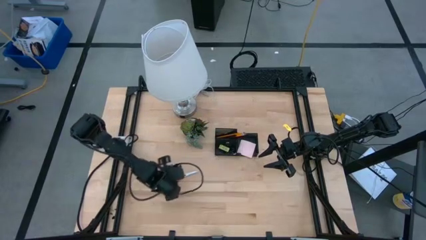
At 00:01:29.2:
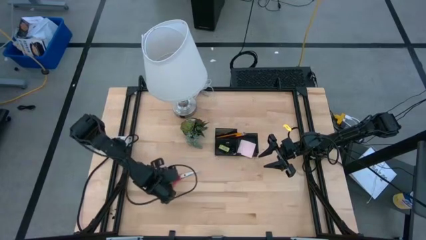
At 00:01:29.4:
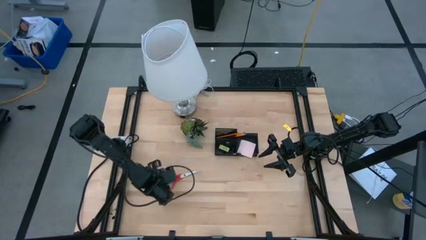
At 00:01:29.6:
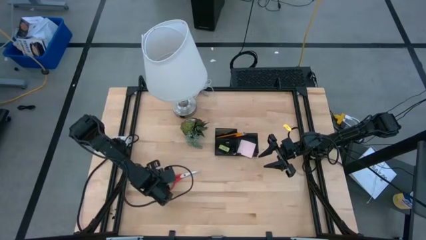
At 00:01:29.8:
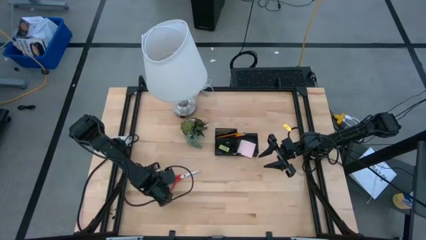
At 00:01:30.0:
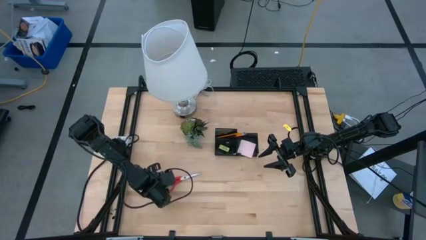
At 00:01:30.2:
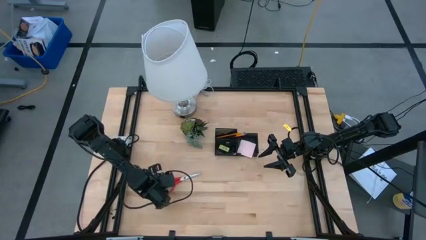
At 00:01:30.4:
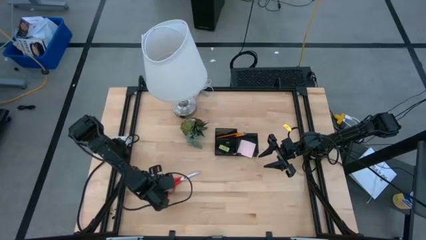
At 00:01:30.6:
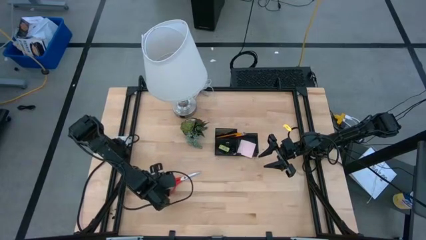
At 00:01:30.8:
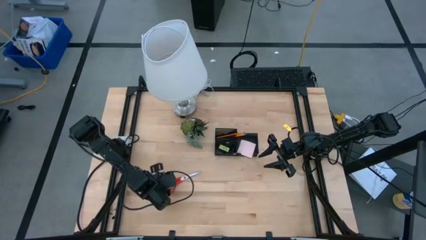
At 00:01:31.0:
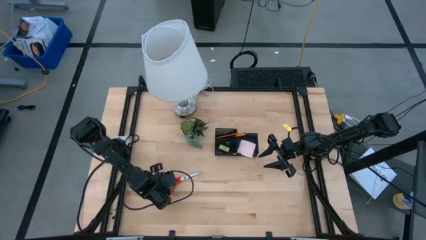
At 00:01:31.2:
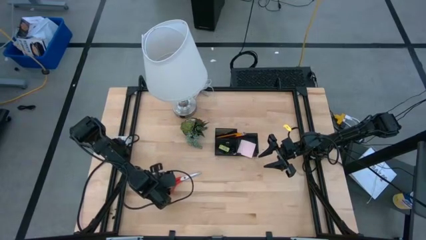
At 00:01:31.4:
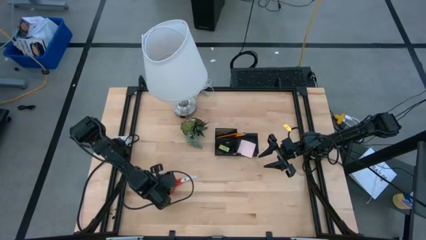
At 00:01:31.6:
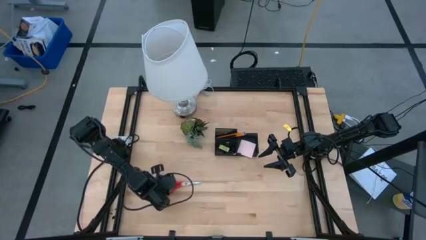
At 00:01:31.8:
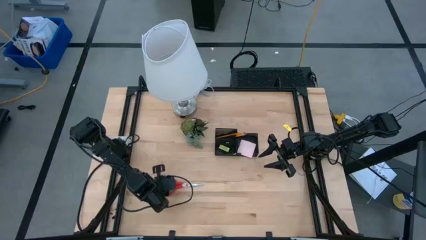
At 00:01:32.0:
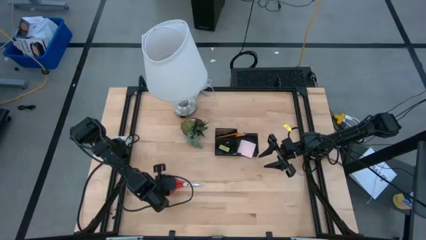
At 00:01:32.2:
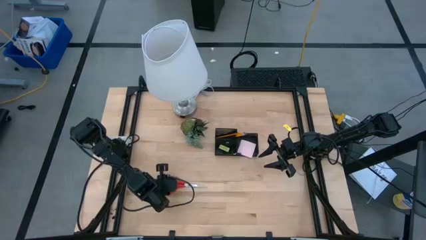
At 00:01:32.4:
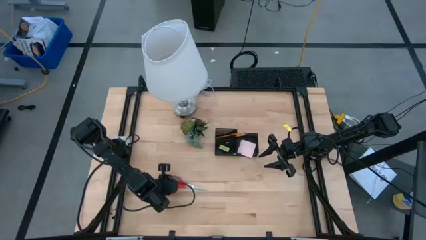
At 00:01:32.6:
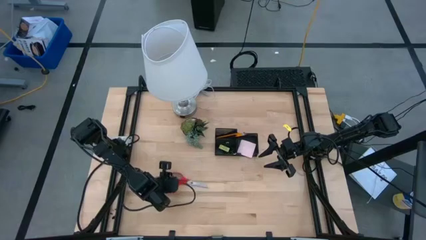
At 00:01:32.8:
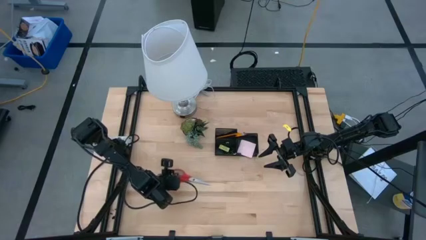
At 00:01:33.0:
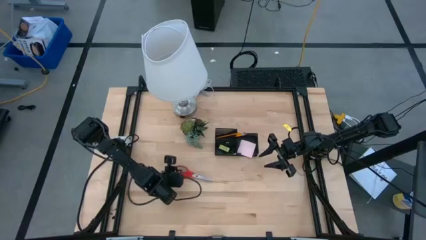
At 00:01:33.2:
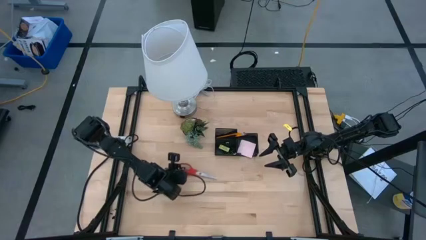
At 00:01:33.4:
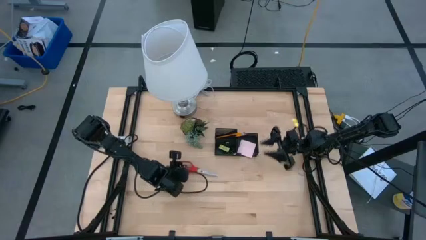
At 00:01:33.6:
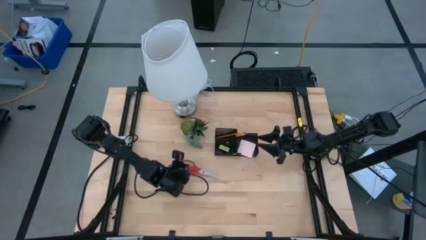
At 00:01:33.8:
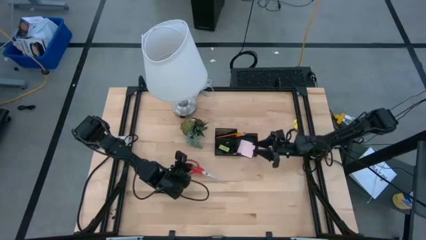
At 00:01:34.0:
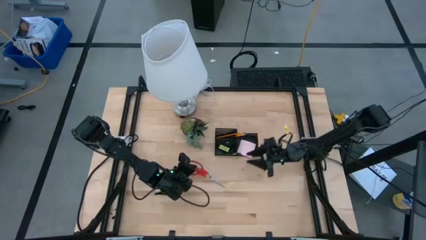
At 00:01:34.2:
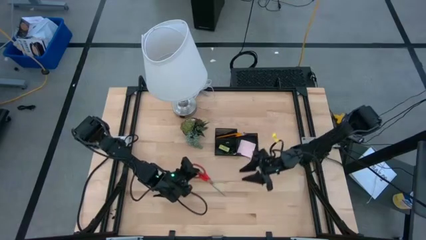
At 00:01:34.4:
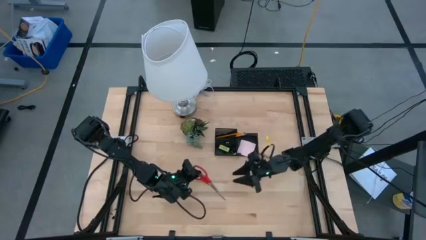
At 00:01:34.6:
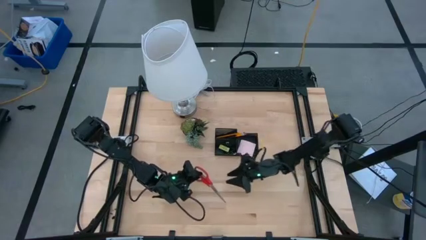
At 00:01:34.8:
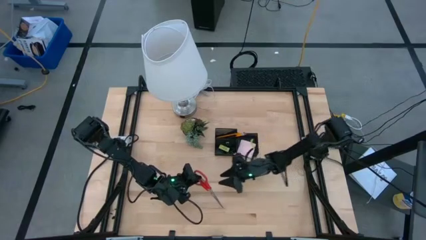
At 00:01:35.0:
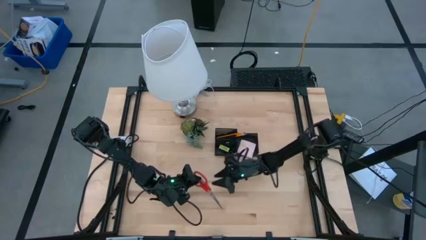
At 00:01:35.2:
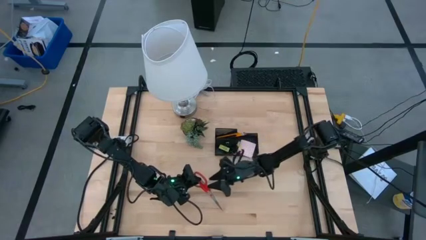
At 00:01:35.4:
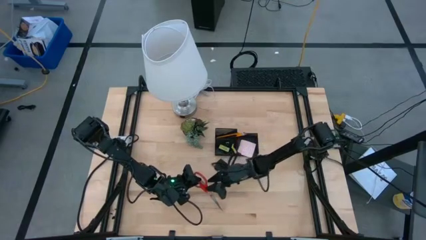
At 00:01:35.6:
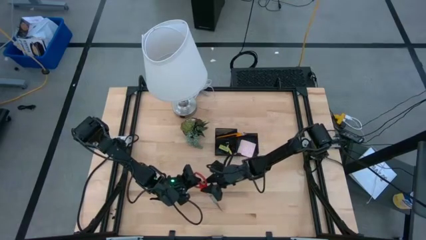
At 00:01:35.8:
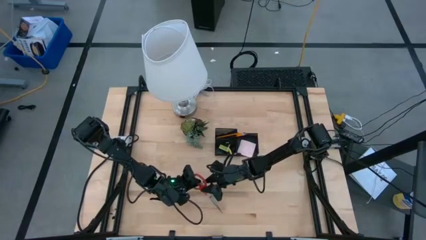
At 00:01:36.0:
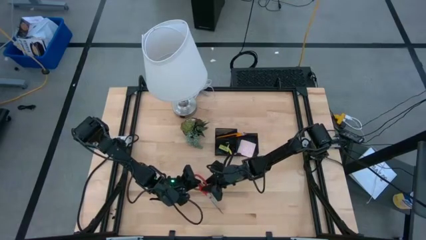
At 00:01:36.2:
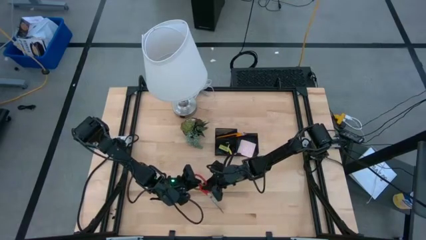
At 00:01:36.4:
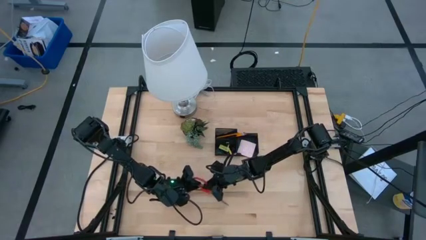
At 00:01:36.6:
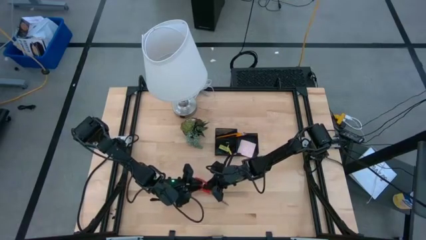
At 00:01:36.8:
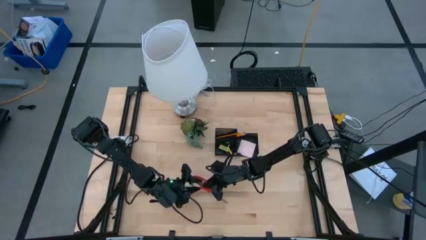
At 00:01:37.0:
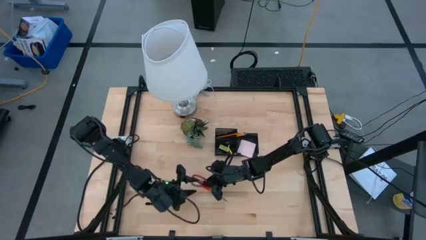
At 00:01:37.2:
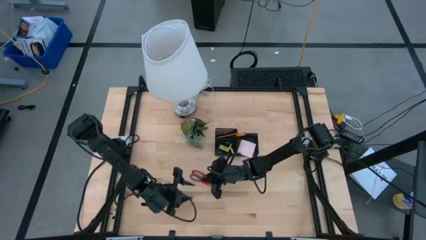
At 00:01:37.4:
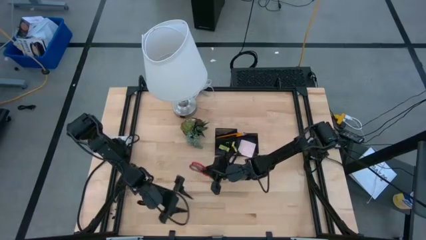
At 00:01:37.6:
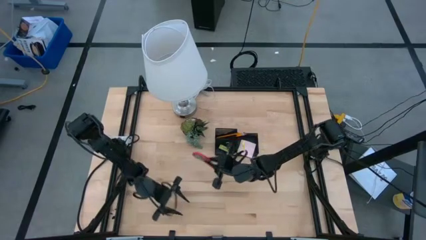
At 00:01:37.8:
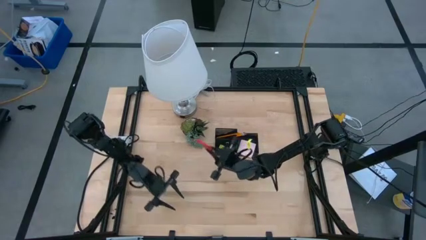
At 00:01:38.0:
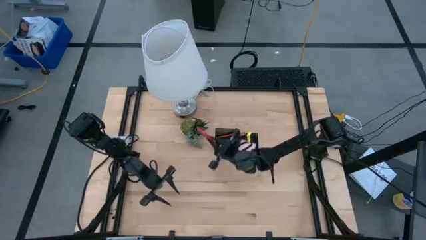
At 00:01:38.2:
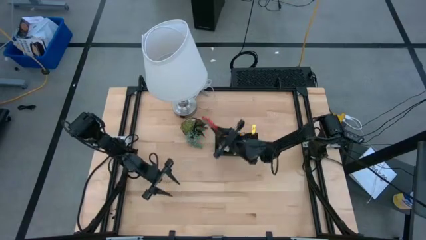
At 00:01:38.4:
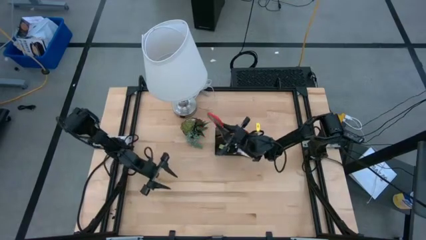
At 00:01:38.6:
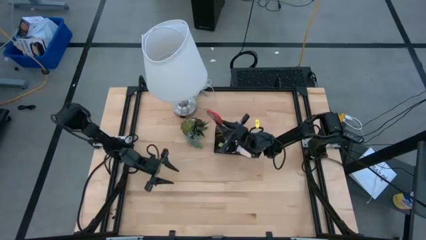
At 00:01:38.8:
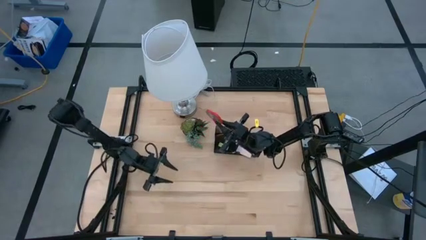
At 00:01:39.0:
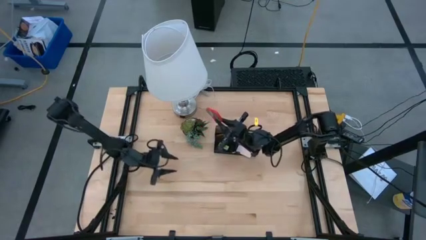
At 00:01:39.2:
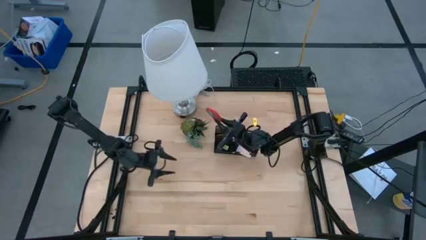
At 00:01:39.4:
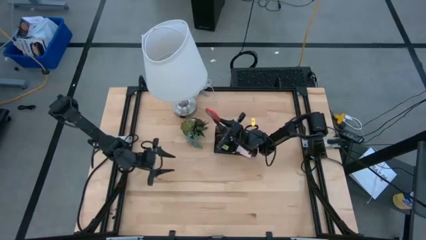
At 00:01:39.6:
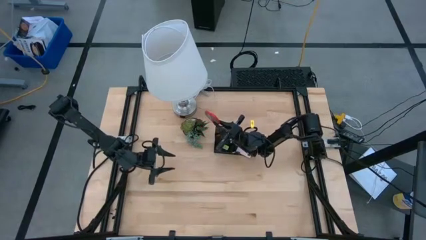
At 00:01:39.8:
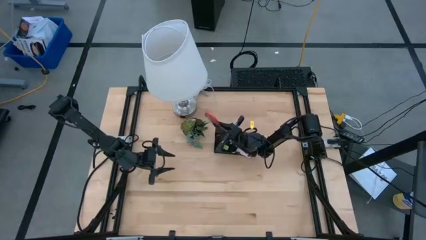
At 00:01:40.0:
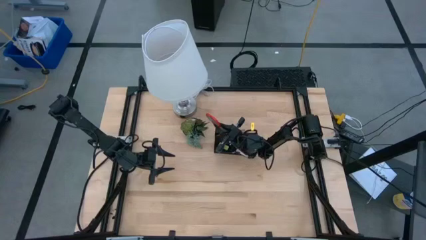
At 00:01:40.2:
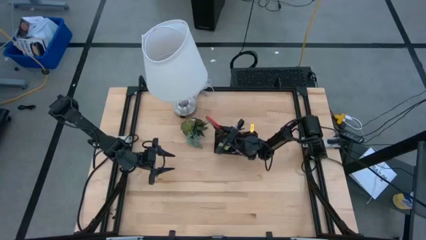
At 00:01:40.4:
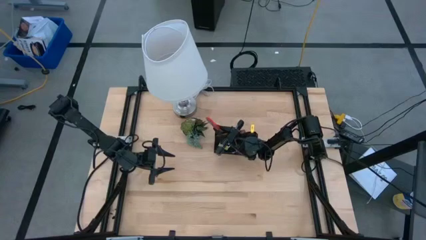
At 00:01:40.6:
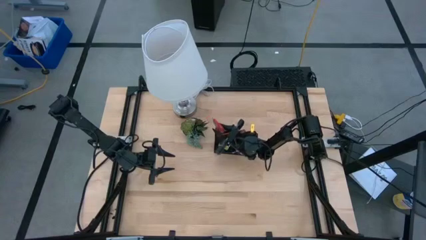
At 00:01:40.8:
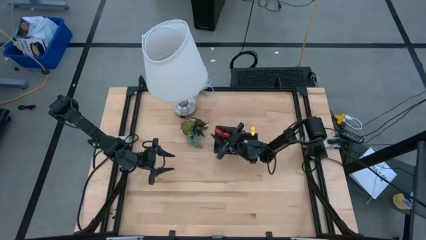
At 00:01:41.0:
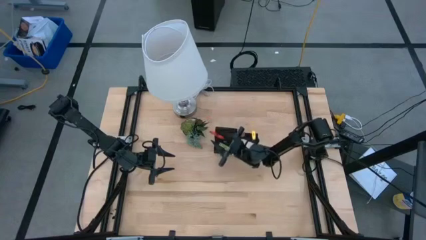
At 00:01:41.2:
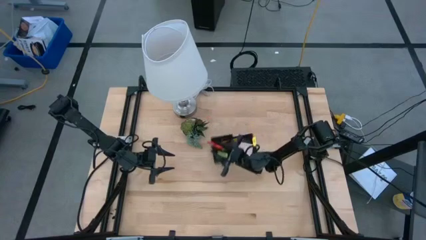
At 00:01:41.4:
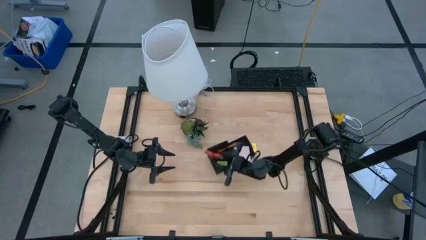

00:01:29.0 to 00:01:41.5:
Task: Pick and place office supplies into organizer
Put the red scissors into the desk organizer
